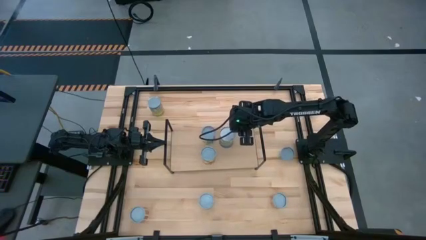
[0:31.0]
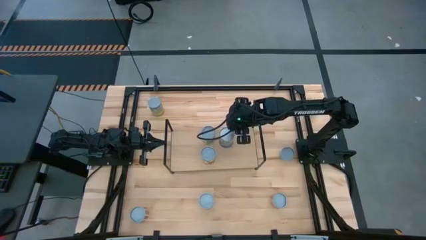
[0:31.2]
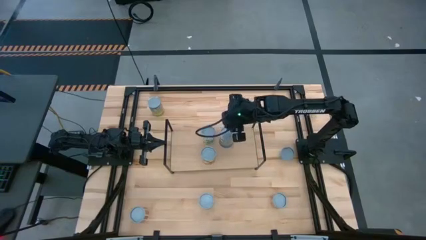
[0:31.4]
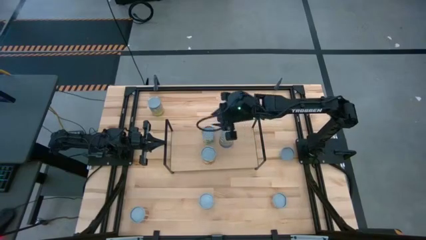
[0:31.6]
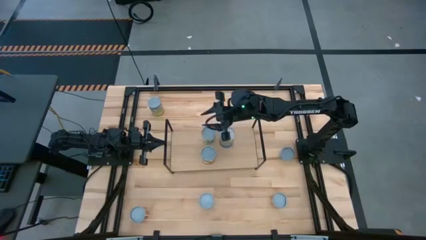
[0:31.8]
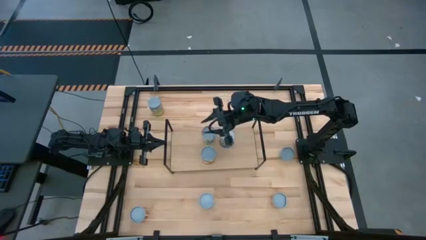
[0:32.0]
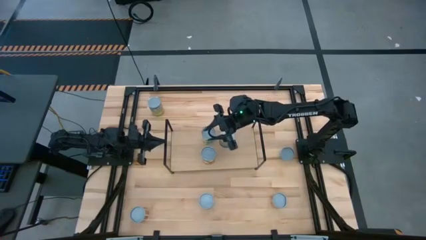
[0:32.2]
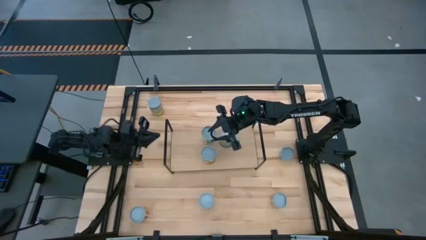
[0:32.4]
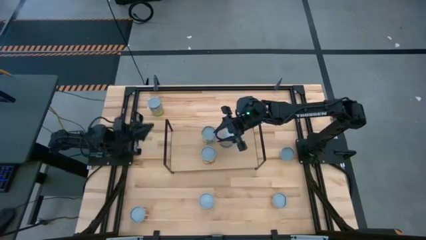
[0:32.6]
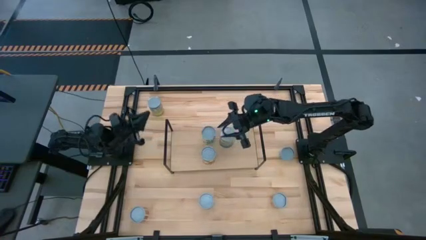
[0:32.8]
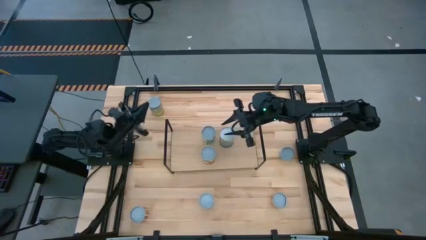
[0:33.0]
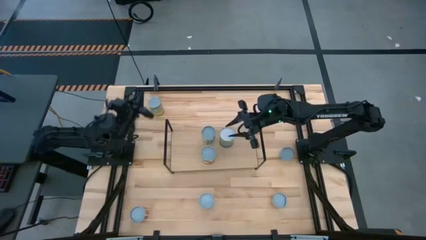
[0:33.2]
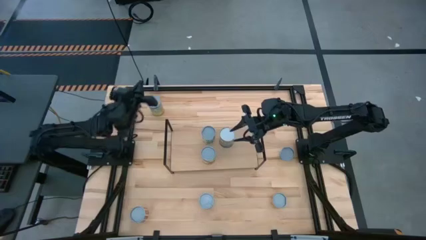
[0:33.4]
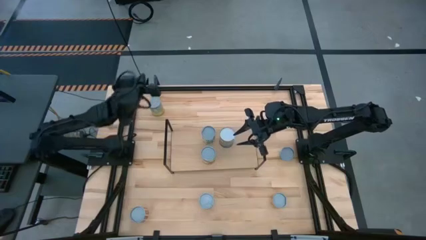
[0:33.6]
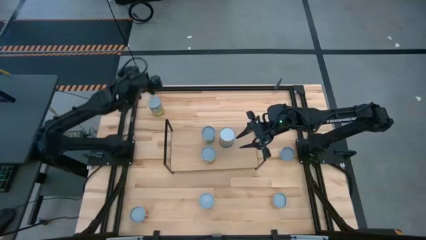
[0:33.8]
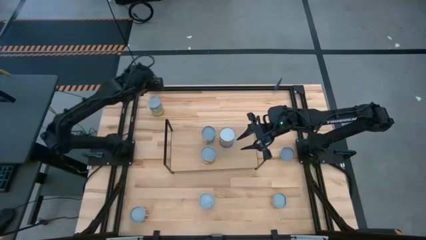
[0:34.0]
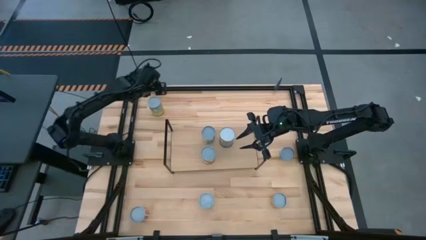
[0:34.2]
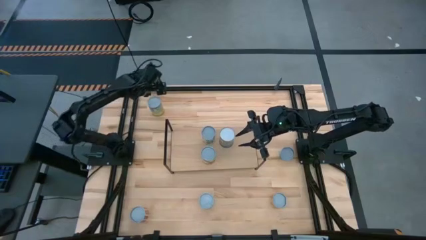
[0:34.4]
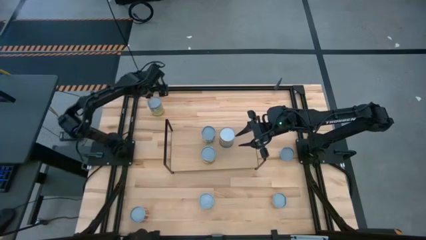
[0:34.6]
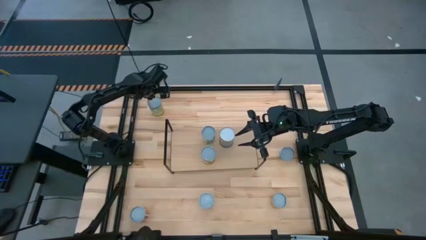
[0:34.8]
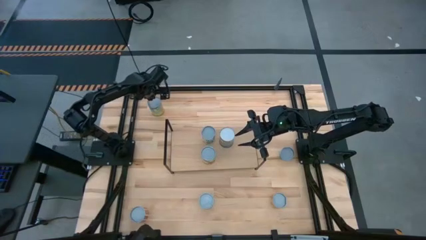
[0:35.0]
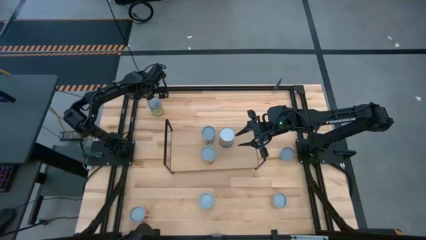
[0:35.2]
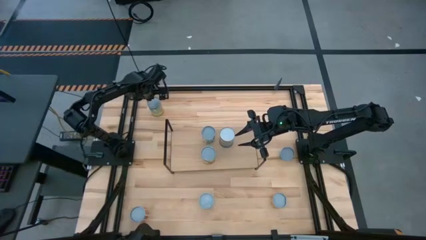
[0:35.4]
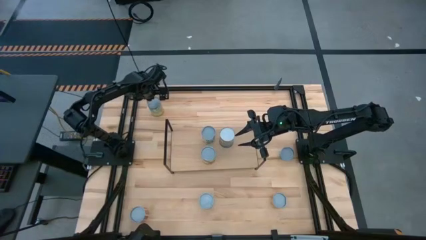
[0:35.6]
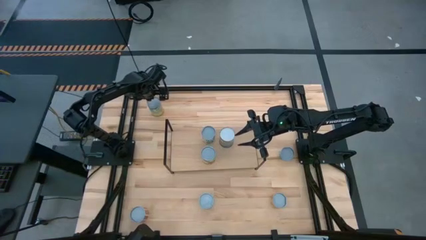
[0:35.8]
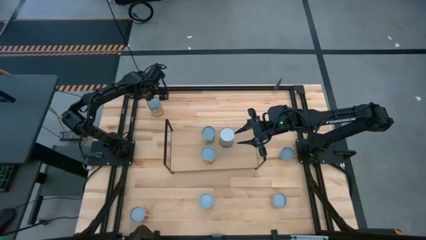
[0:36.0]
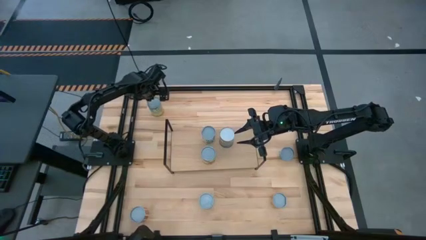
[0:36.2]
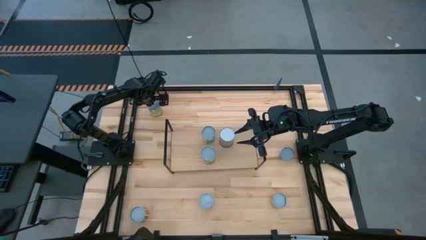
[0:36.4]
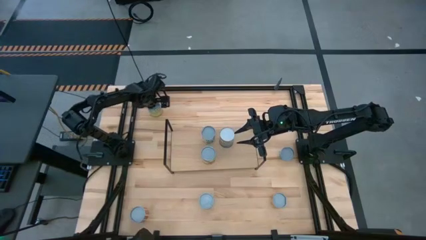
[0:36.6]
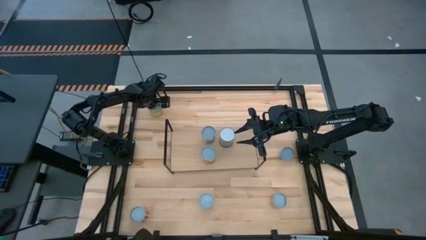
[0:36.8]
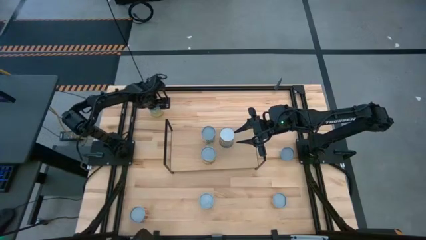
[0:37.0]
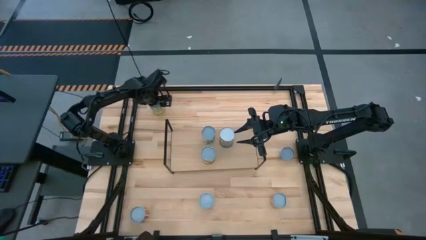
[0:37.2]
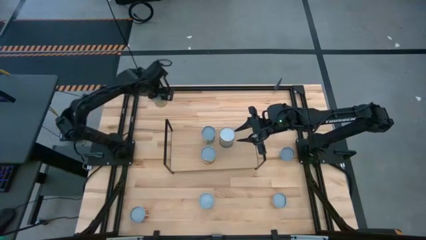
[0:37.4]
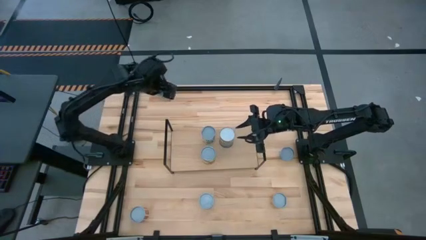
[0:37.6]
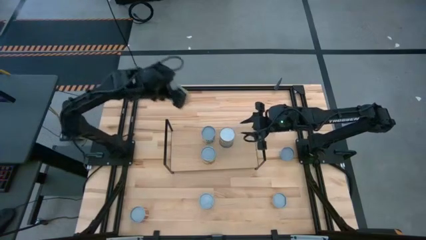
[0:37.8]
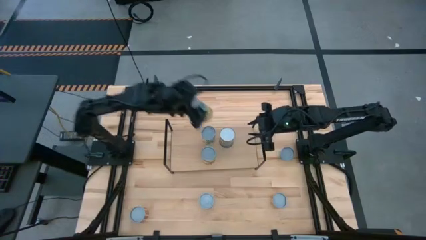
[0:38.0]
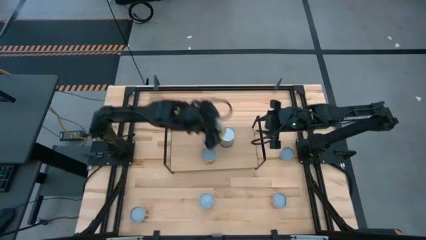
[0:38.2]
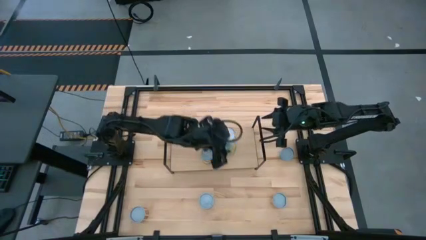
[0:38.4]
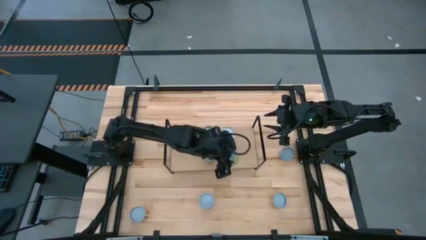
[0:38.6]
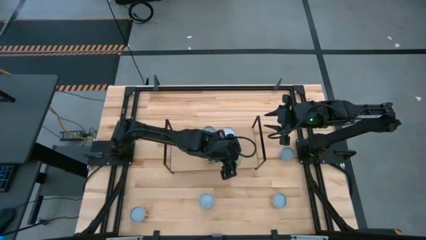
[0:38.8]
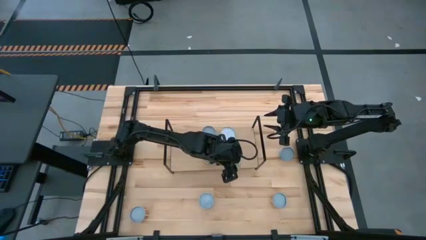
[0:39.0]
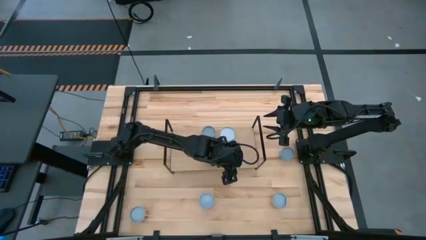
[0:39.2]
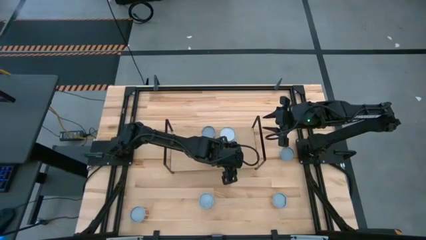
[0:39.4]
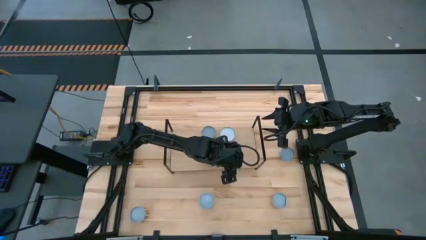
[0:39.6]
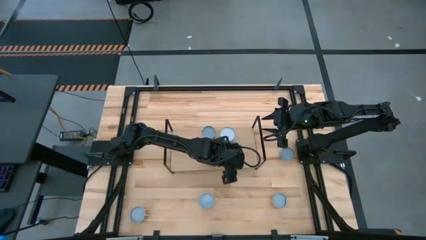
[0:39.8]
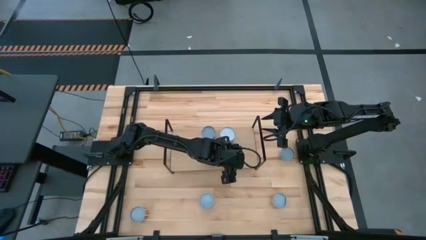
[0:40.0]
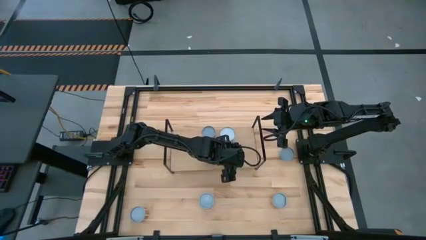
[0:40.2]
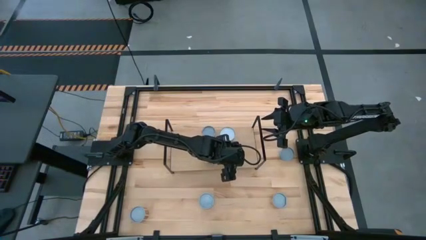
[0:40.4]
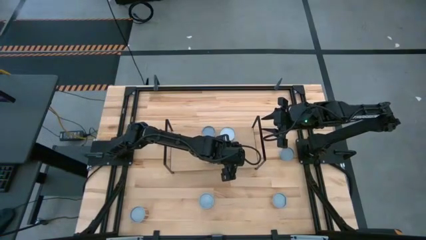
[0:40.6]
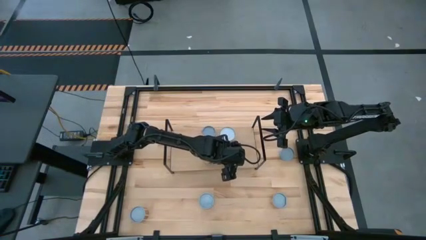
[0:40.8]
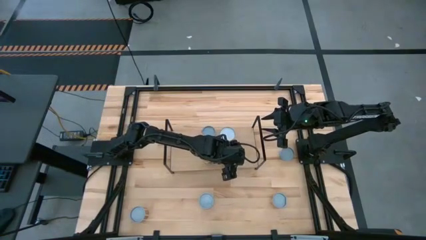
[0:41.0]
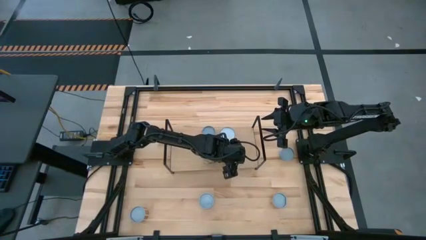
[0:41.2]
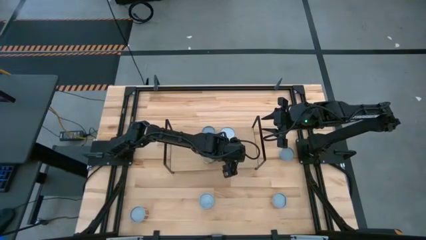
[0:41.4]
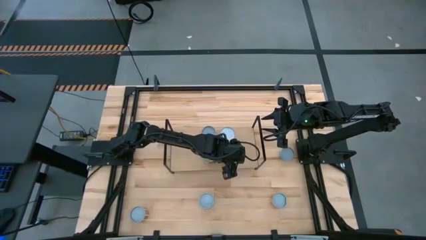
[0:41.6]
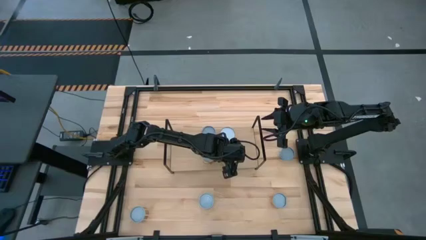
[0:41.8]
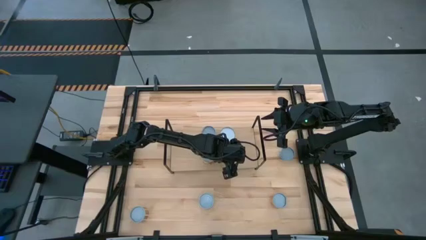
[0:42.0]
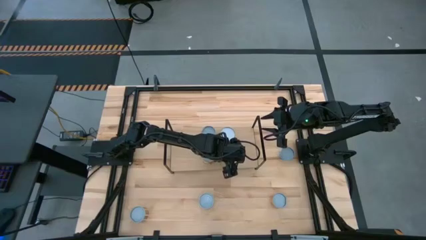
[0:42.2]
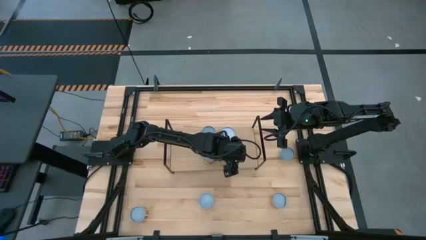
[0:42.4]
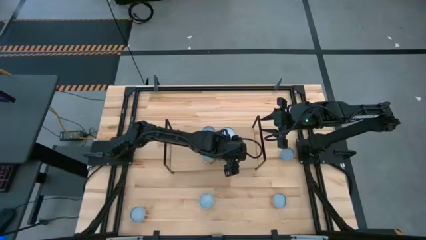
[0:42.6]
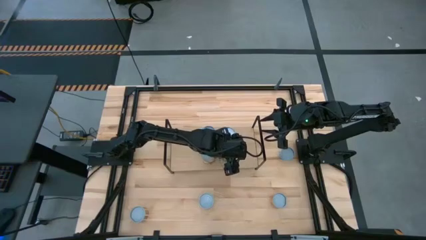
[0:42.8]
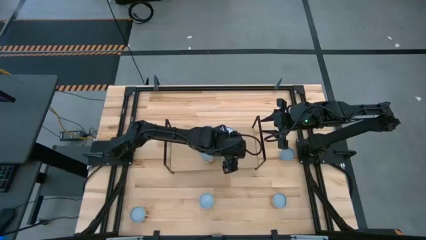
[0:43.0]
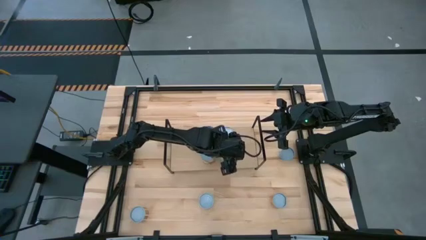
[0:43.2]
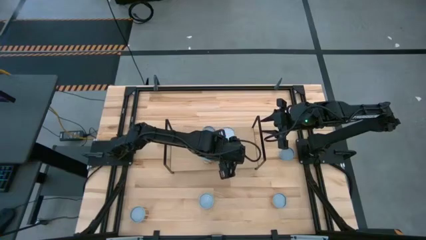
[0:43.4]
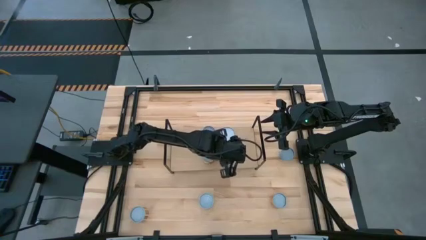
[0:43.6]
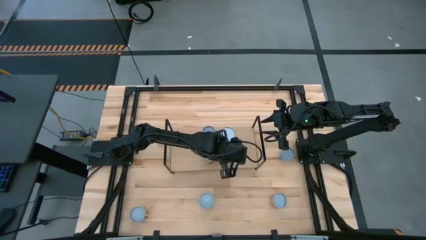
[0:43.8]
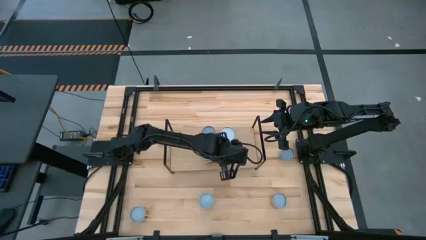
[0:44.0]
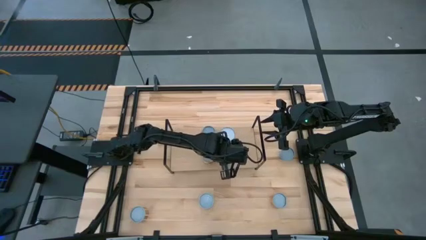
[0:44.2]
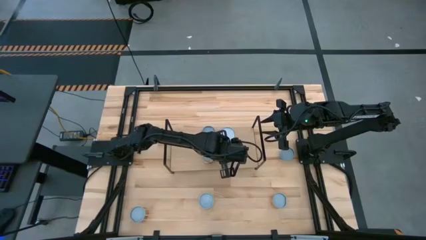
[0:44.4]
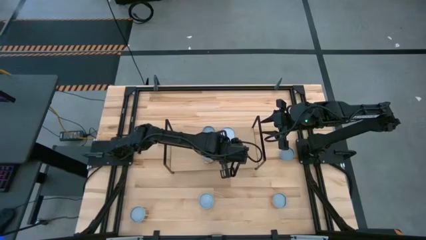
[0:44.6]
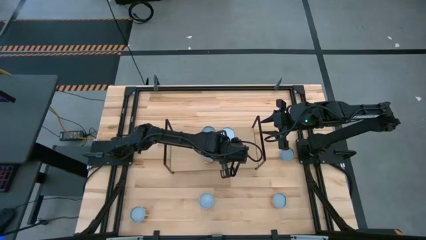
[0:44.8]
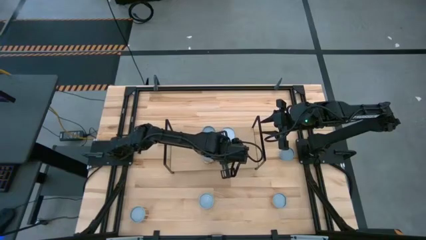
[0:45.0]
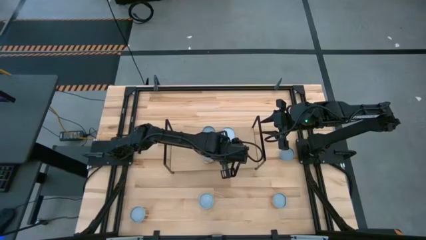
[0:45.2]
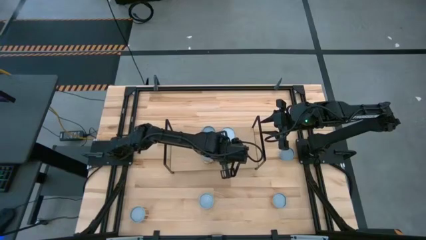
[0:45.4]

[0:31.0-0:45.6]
Task: Pick and place cans onto a shelf
Put the canned carrots on the shelf

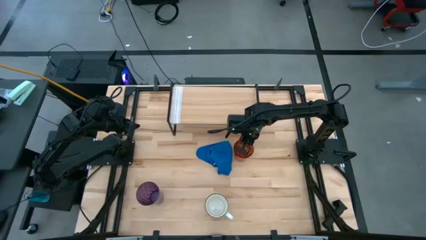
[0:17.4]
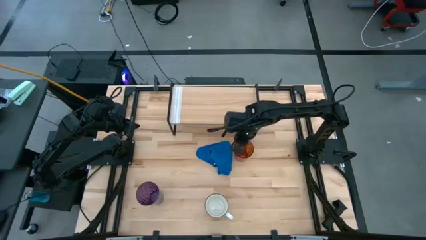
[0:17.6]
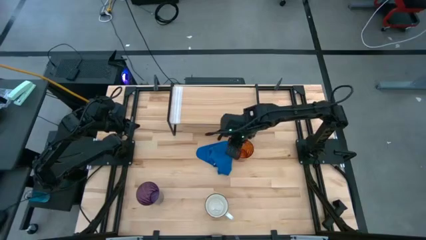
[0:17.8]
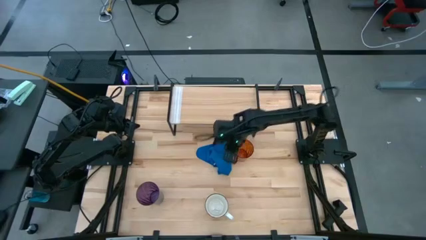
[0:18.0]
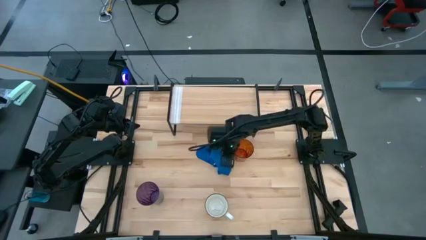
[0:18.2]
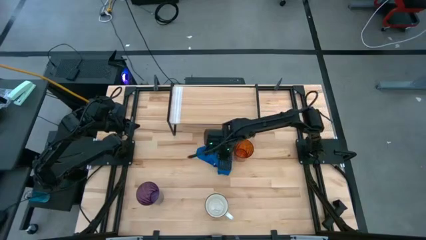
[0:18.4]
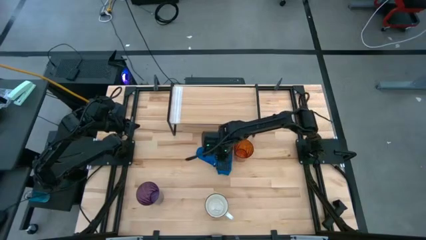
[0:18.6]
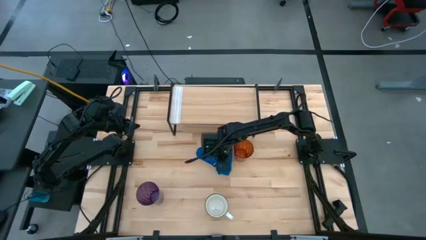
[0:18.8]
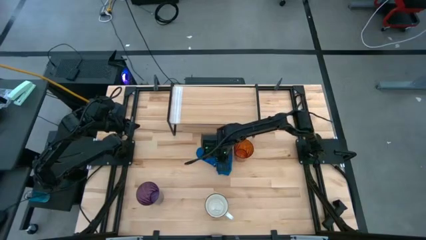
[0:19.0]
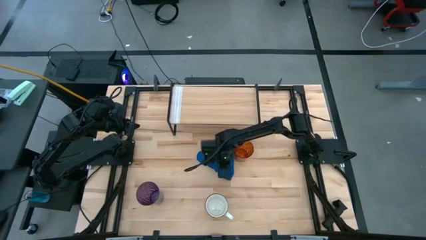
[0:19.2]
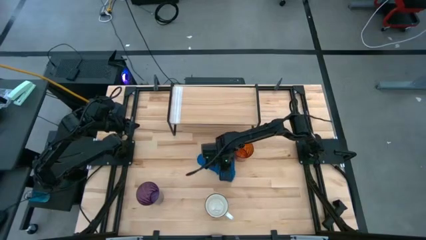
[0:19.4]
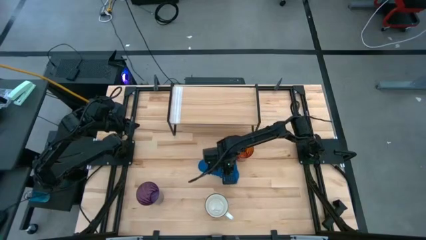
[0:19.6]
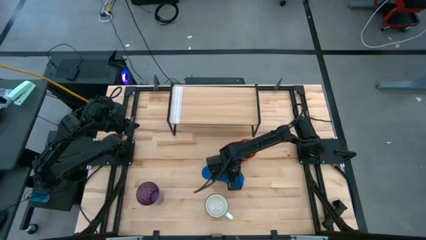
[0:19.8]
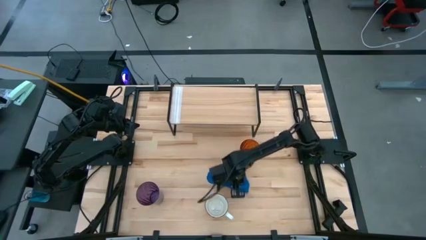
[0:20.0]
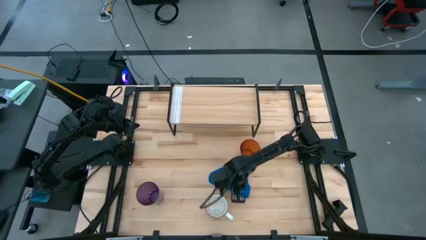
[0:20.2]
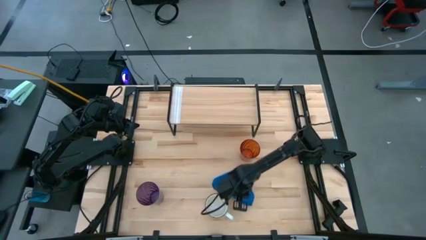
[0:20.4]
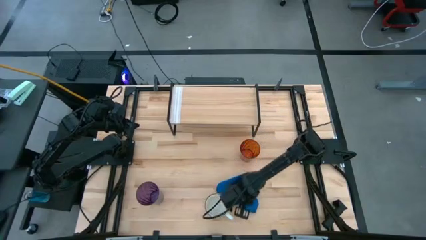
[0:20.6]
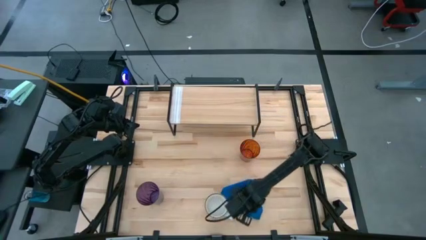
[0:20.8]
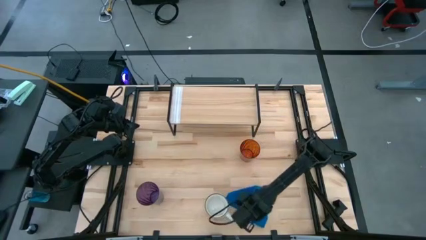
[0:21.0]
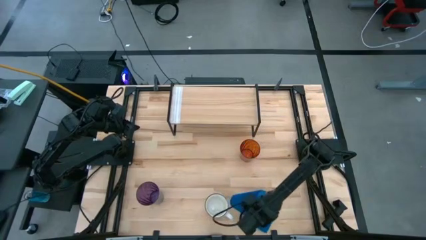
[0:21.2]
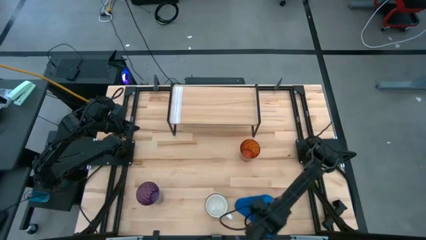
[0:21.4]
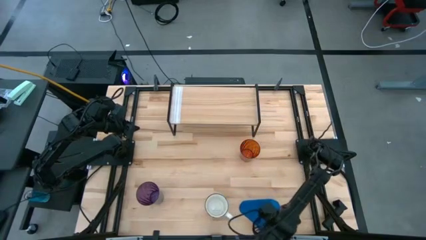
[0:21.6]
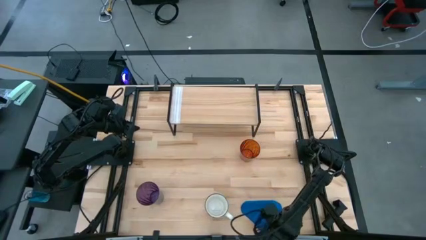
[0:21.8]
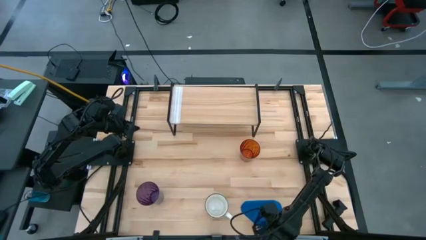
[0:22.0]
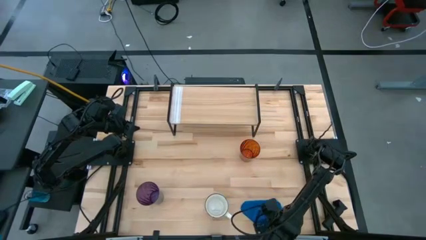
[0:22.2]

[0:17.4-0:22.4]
Task: Stack small to large cups/mugs on shelf
Move the blue towel to the bottom right corner of the table
